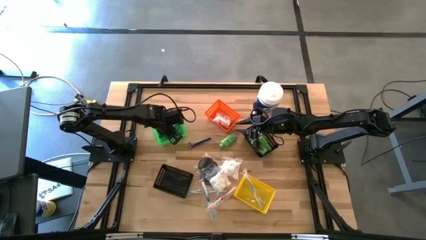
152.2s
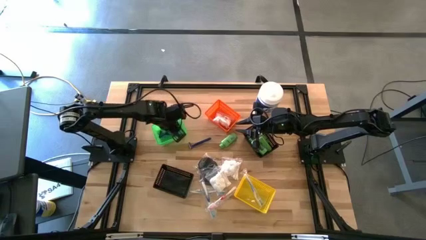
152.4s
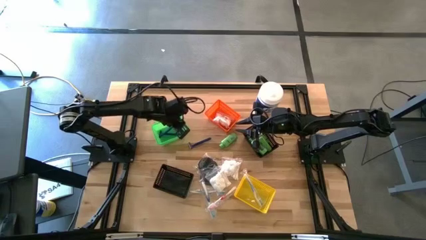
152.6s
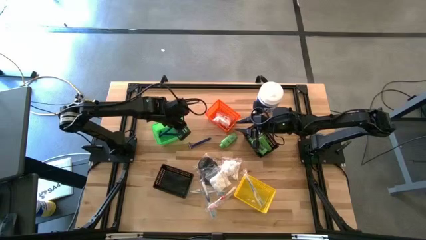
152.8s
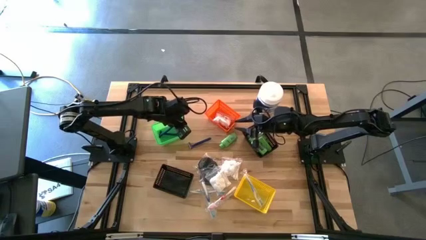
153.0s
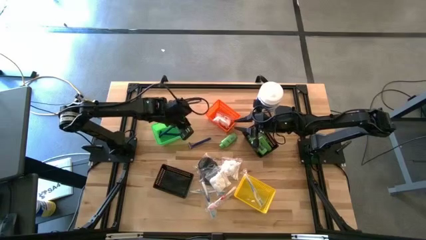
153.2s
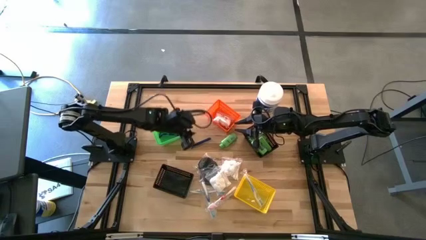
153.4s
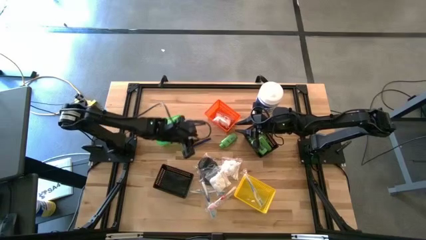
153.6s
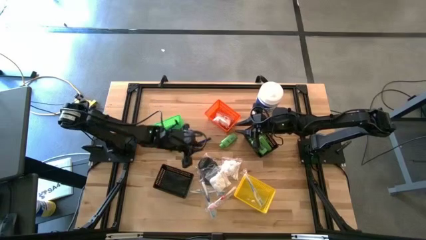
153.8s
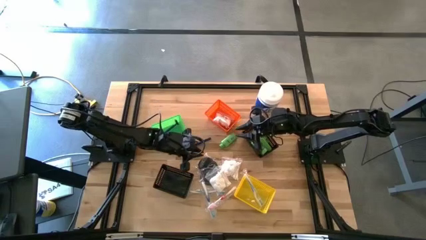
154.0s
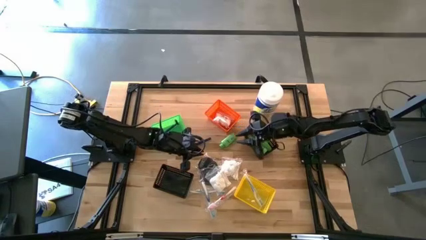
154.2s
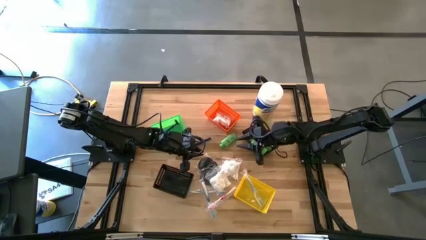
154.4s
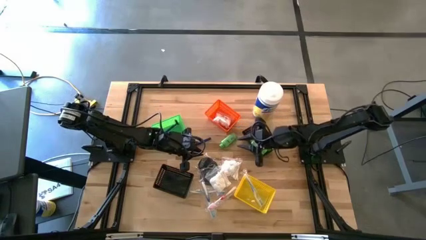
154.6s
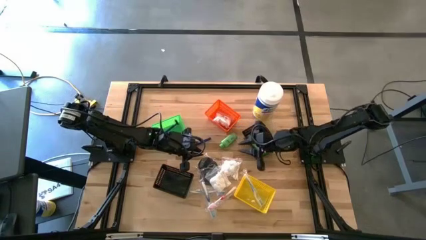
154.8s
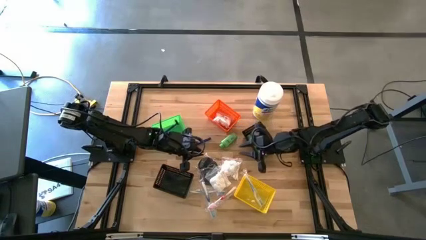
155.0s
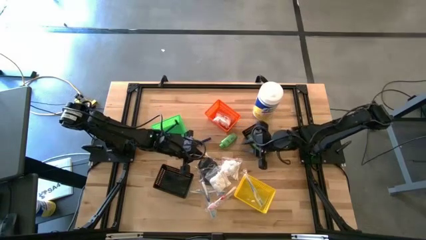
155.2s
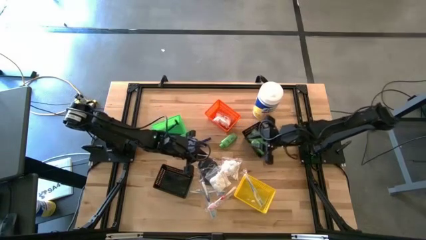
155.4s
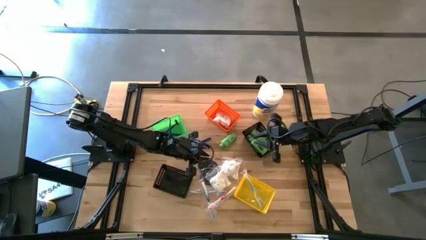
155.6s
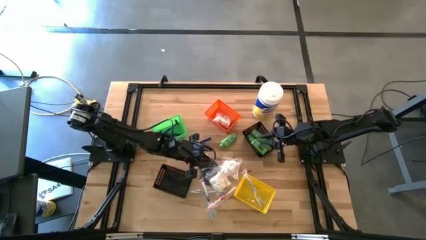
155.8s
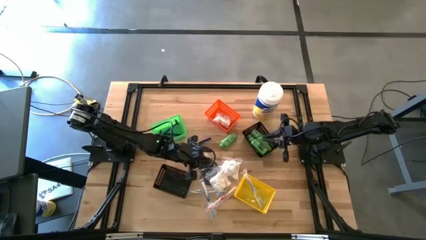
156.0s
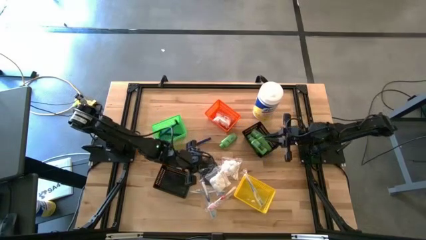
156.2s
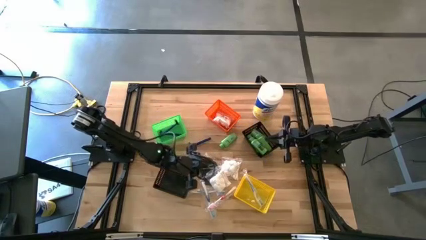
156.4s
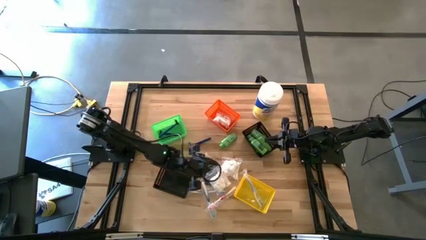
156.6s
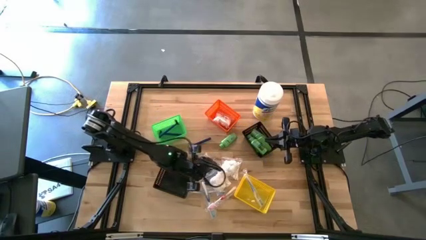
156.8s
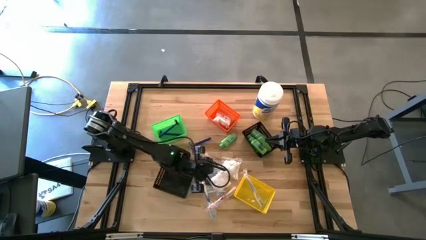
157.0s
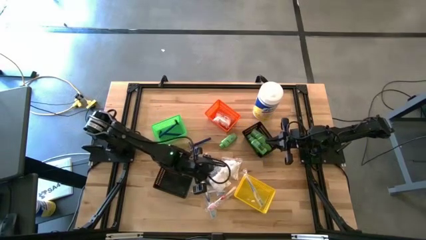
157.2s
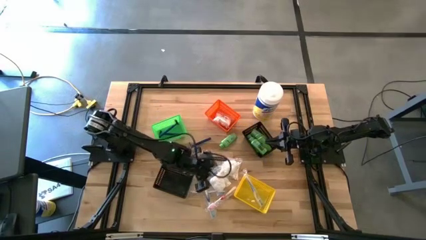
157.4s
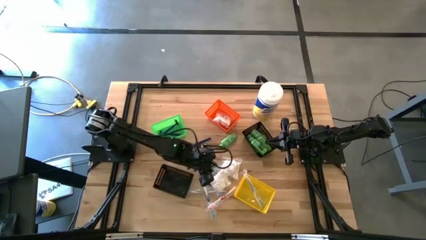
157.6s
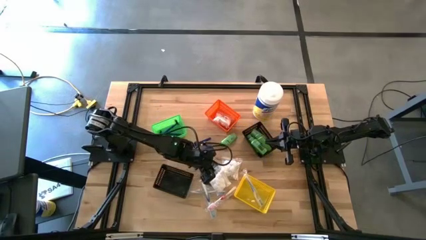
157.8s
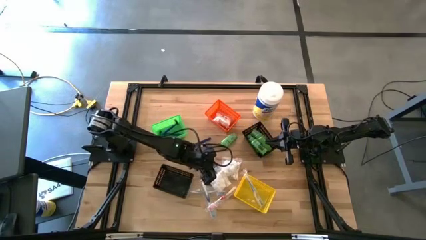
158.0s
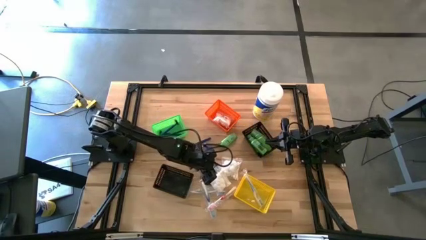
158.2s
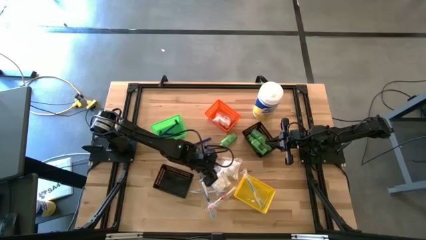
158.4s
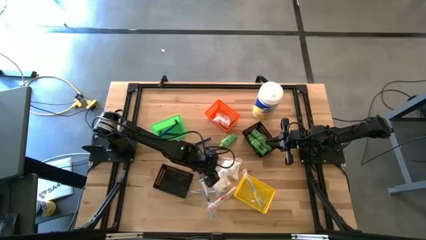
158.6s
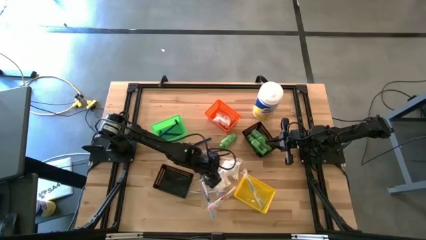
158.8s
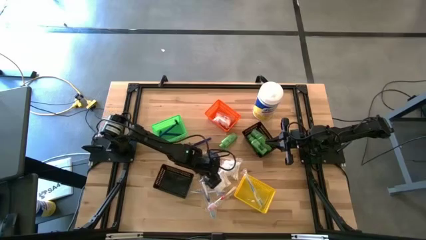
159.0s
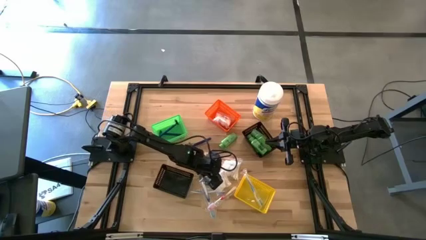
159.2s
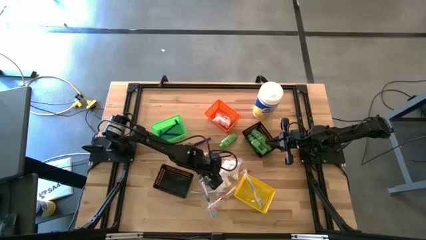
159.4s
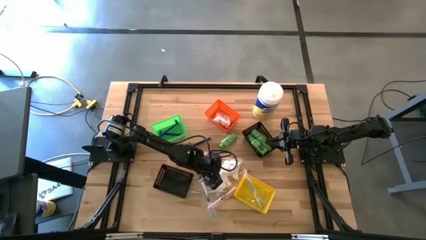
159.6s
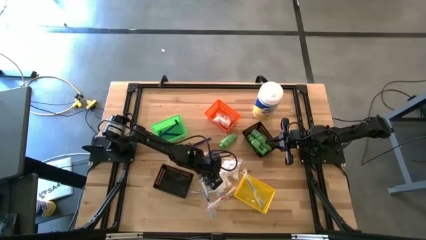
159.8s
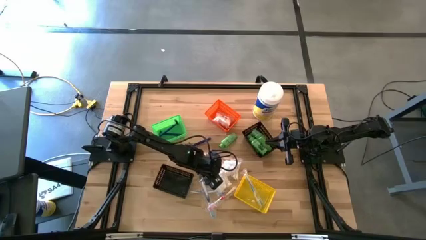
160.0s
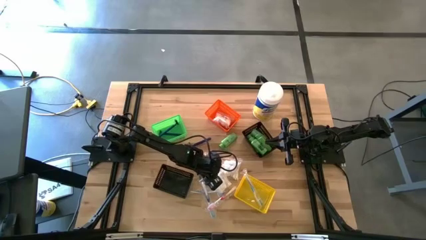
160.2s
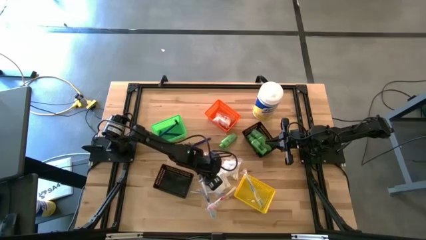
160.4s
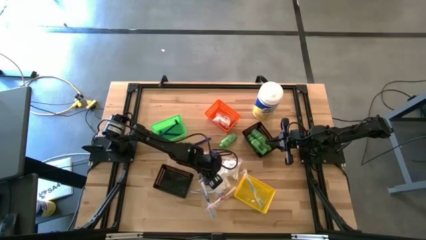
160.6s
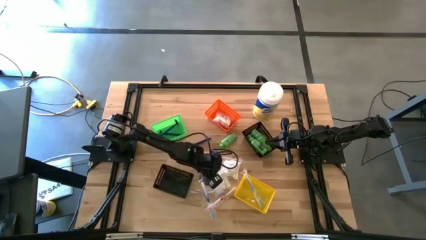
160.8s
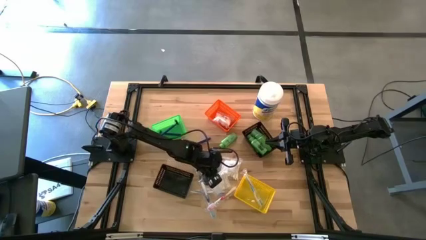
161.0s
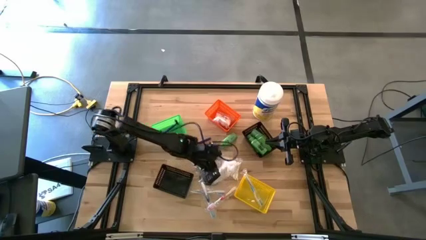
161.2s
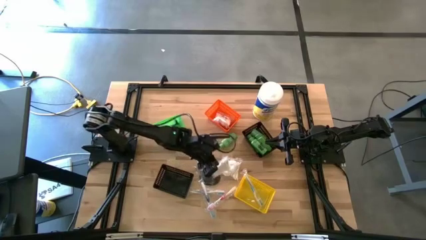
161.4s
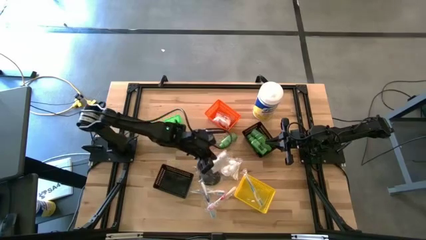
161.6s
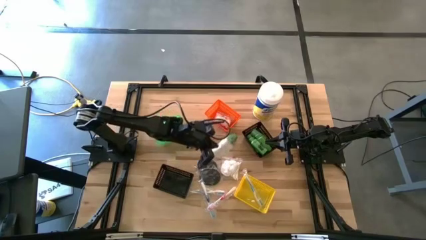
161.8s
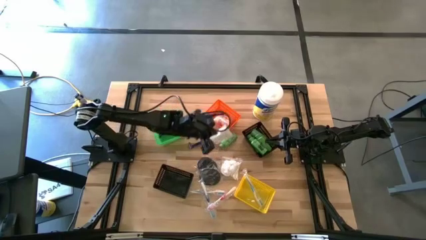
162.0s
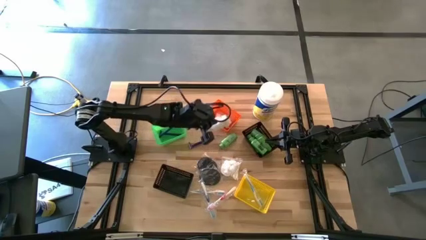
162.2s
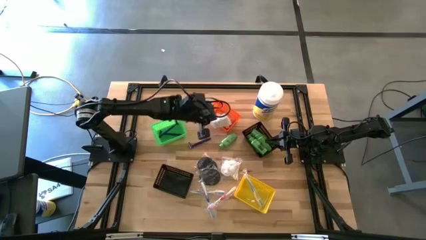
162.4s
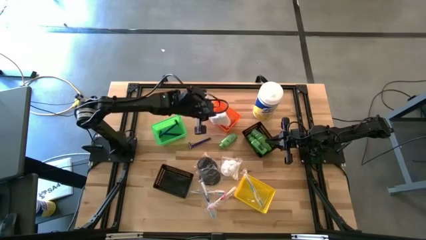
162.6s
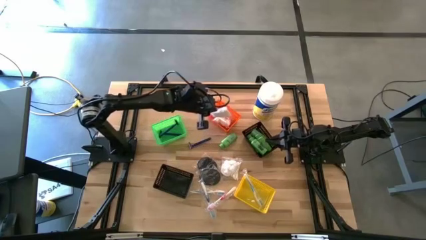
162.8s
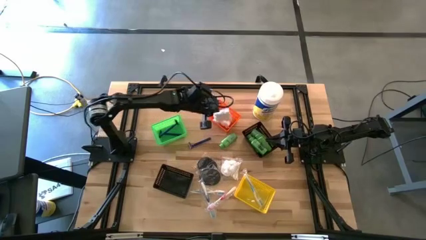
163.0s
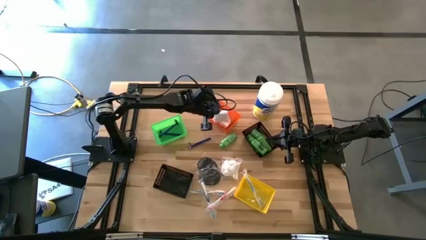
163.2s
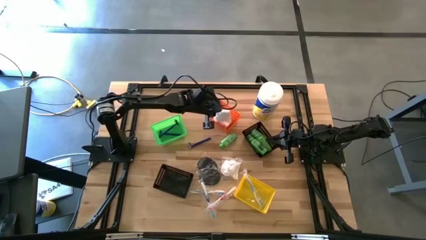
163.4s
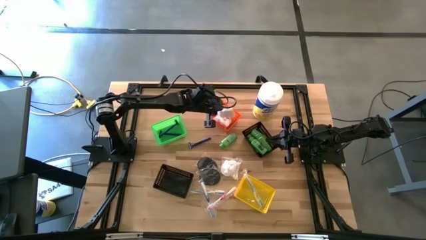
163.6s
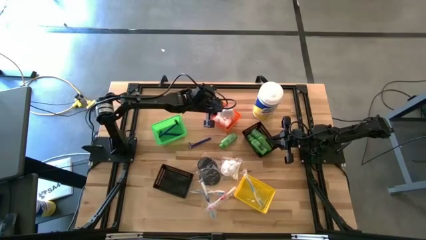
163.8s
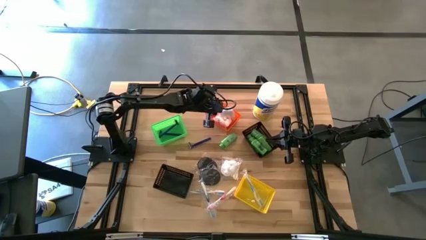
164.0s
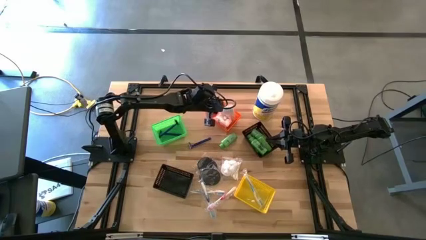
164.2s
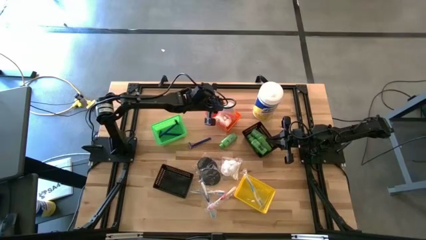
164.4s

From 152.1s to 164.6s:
Task: Pick & Place Travel size toiletries
Put the white cotton pack into the orange bin
